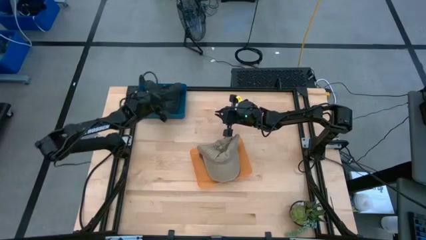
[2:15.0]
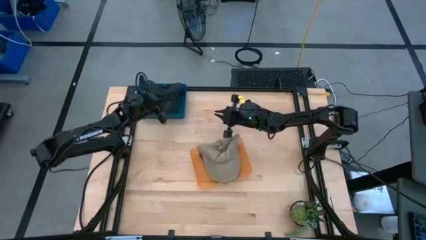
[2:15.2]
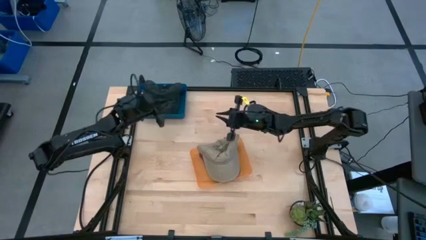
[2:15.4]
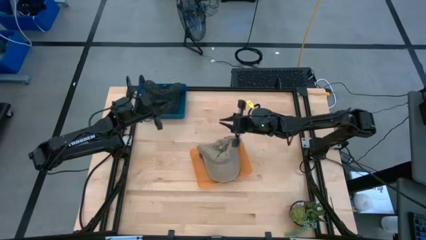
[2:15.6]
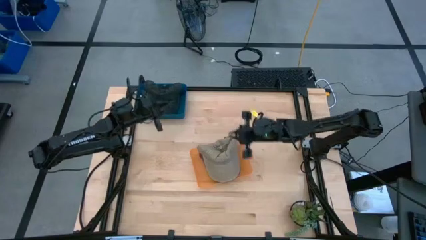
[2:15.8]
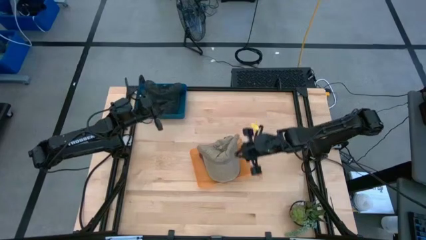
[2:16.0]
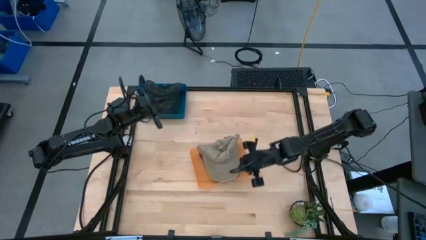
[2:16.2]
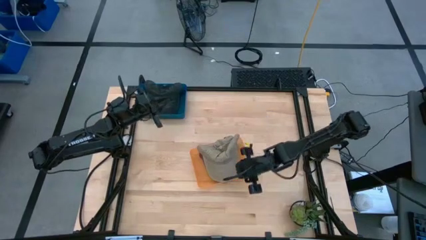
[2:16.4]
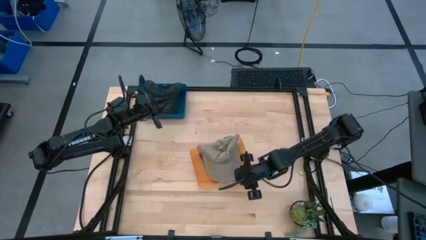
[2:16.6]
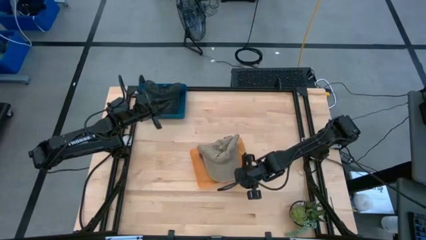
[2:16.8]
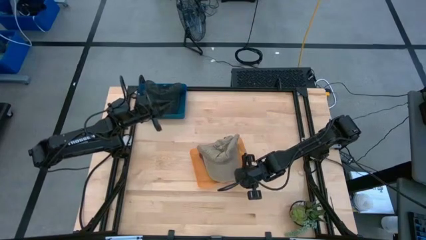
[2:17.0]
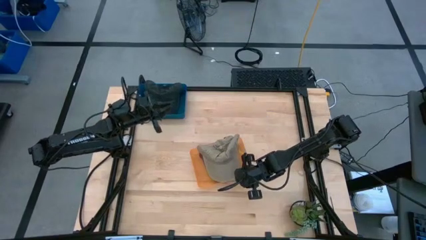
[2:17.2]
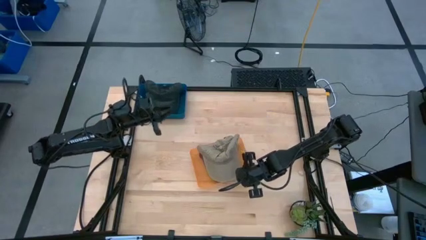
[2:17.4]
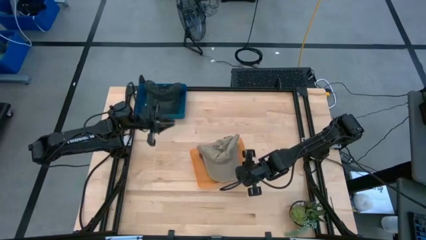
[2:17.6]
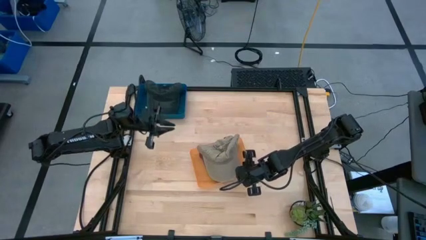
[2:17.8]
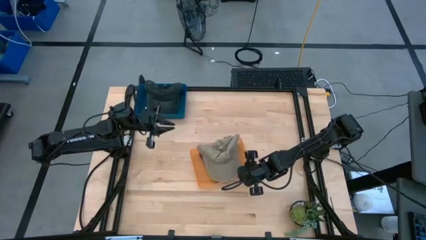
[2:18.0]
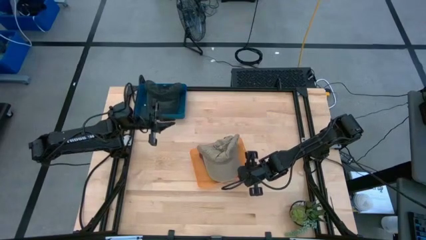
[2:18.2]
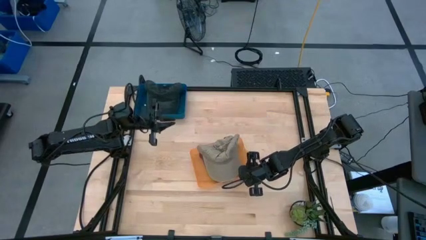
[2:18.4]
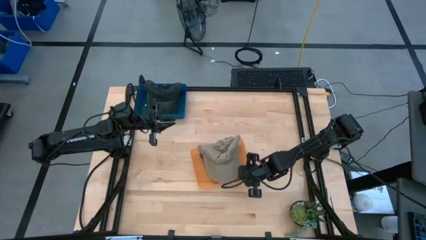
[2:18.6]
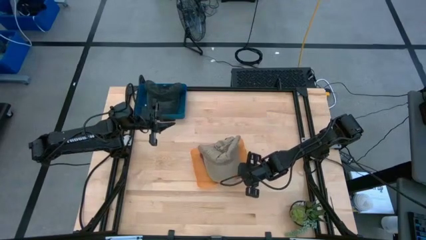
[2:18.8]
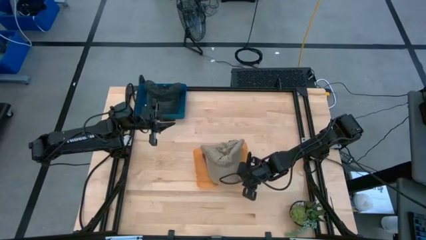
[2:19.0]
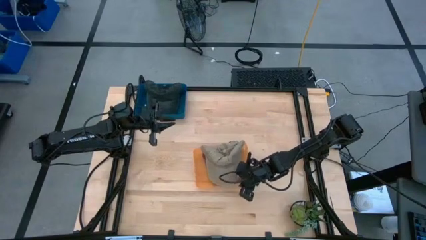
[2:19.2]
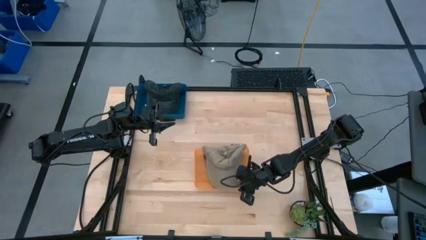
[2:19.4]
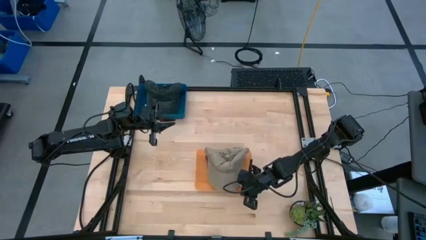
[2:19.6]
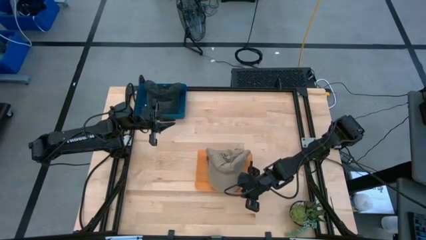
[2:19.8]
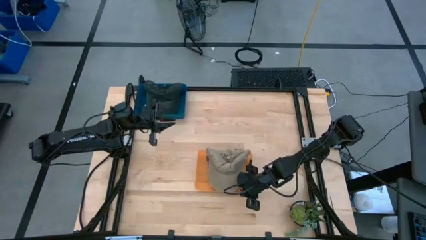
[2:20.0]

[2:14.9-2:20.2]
Task: Pick & Place hat
Adjust the orange bin

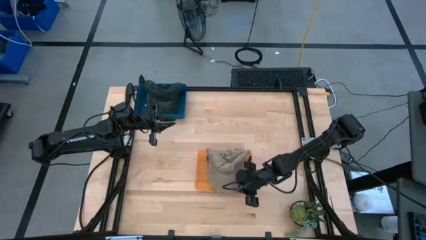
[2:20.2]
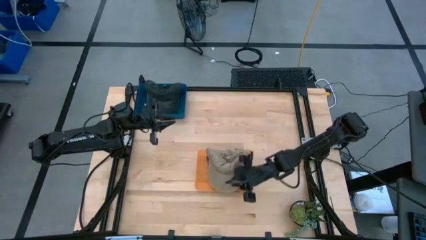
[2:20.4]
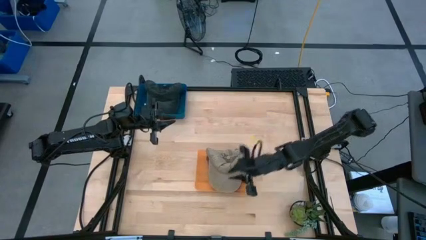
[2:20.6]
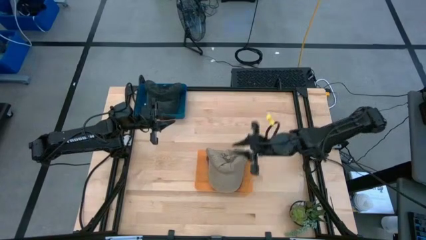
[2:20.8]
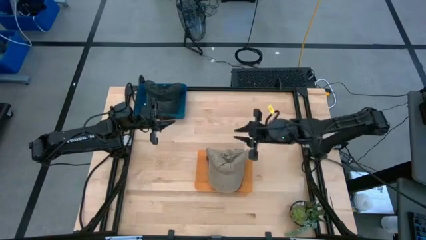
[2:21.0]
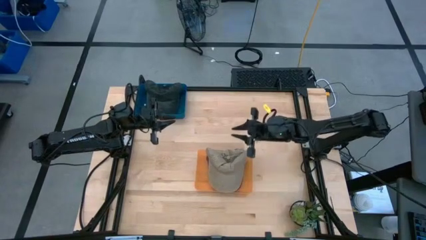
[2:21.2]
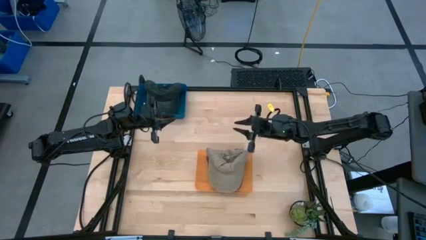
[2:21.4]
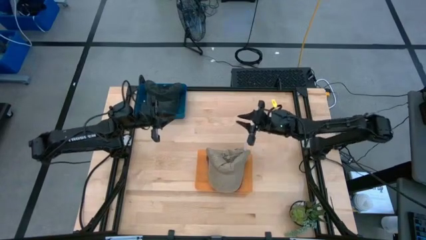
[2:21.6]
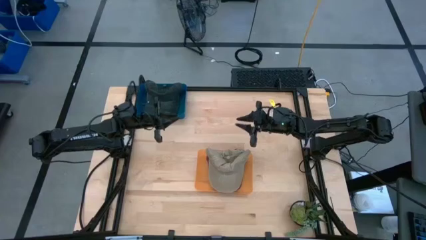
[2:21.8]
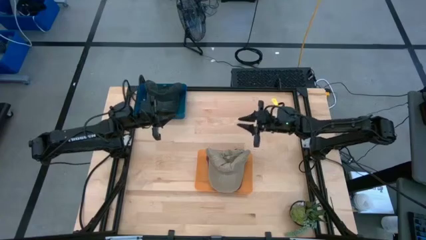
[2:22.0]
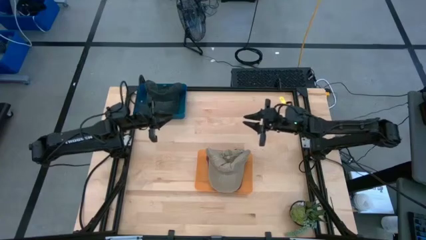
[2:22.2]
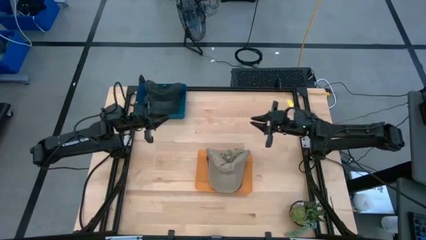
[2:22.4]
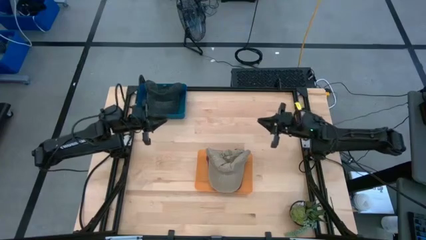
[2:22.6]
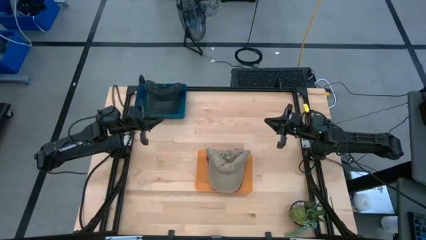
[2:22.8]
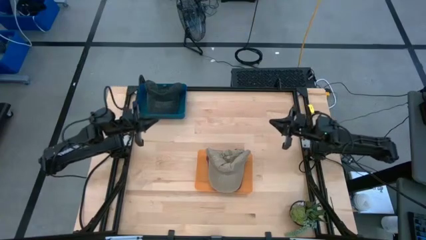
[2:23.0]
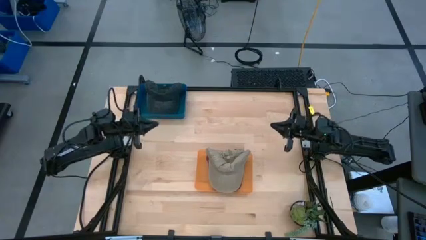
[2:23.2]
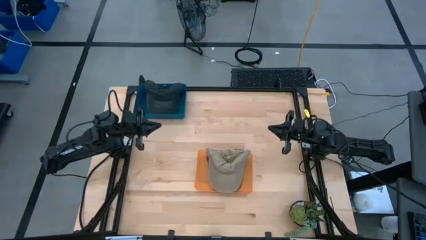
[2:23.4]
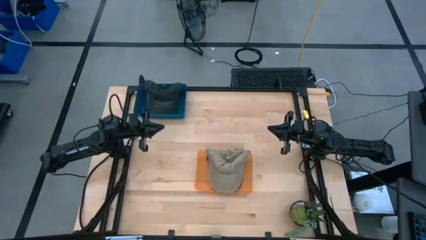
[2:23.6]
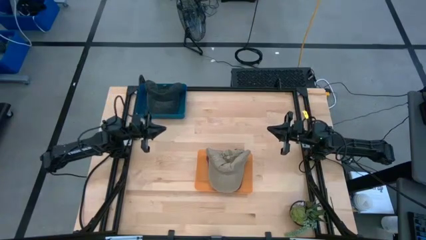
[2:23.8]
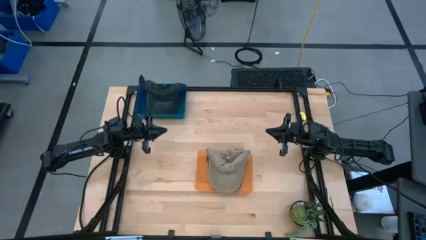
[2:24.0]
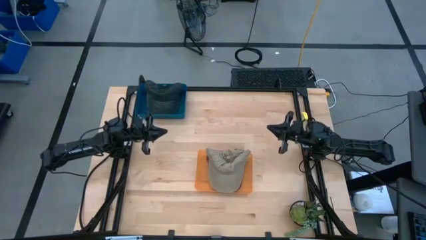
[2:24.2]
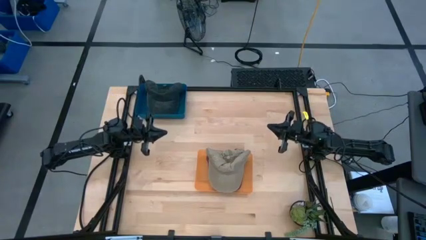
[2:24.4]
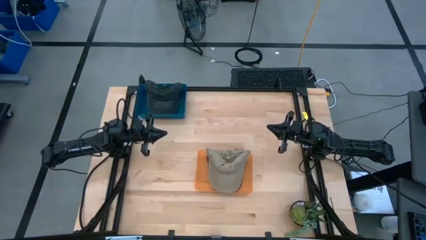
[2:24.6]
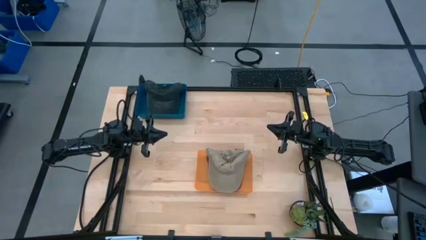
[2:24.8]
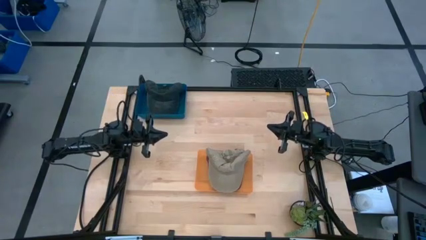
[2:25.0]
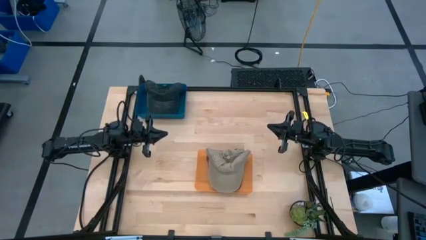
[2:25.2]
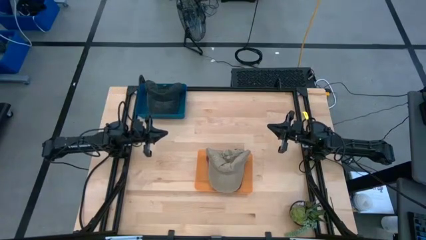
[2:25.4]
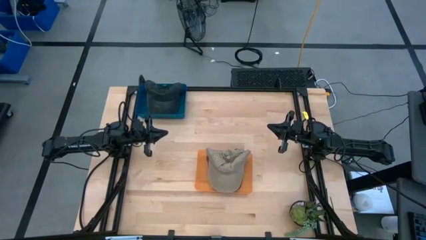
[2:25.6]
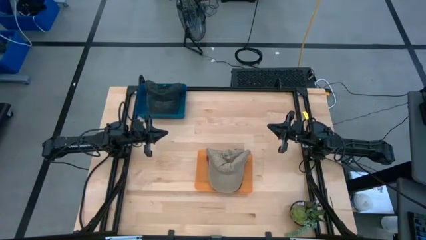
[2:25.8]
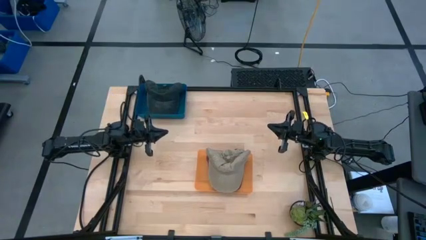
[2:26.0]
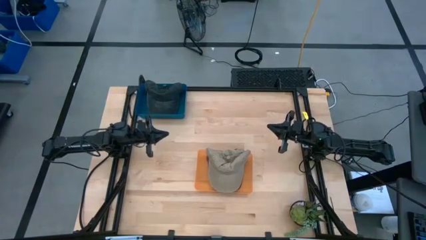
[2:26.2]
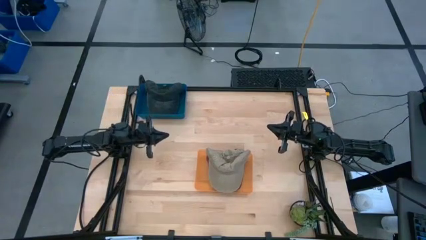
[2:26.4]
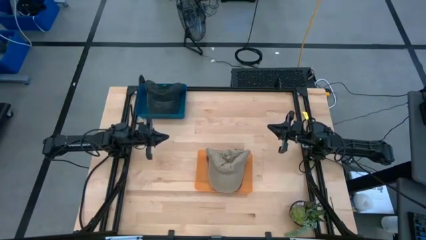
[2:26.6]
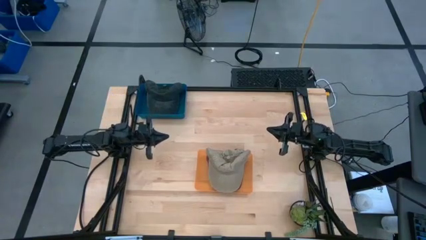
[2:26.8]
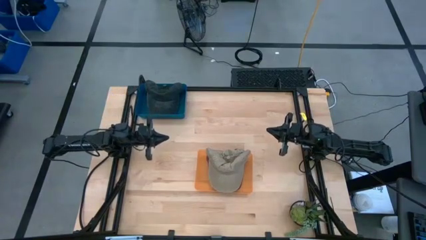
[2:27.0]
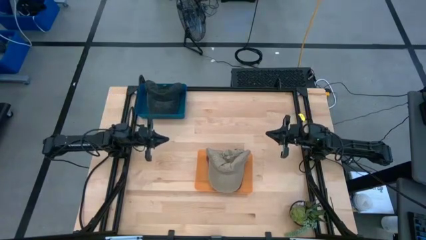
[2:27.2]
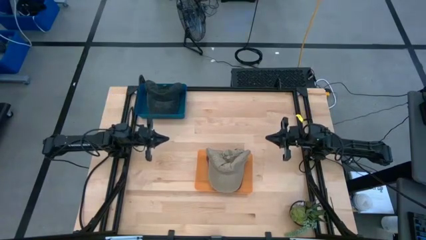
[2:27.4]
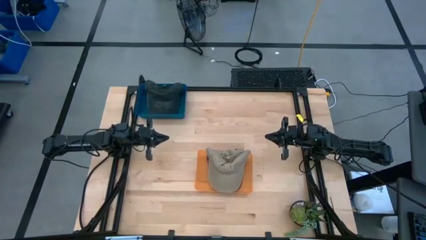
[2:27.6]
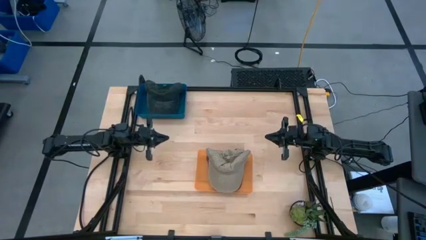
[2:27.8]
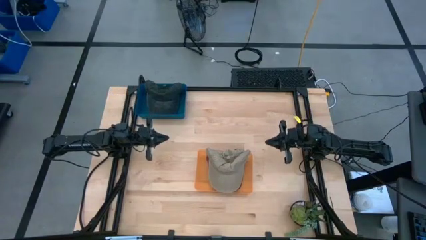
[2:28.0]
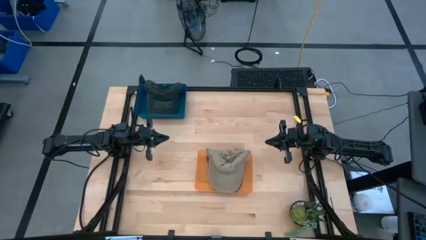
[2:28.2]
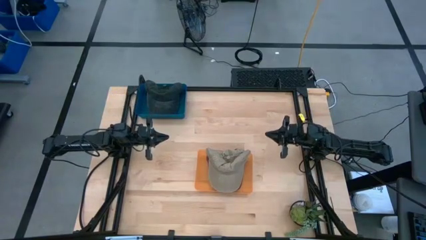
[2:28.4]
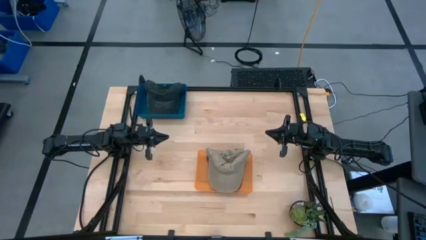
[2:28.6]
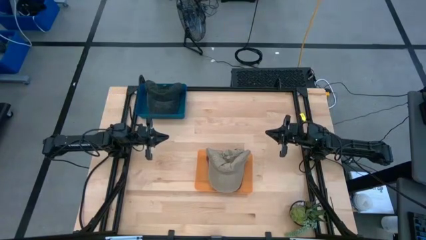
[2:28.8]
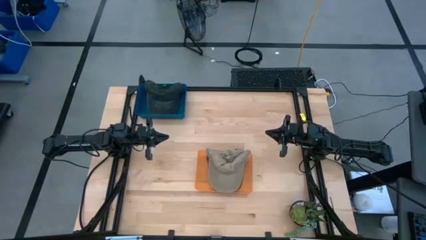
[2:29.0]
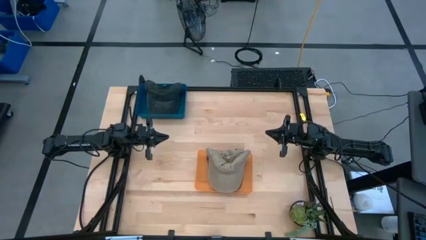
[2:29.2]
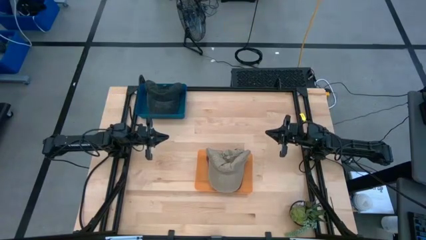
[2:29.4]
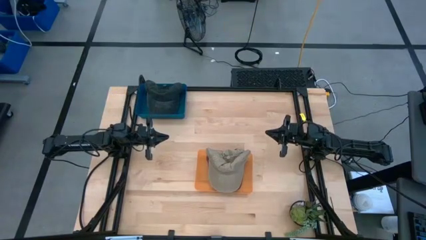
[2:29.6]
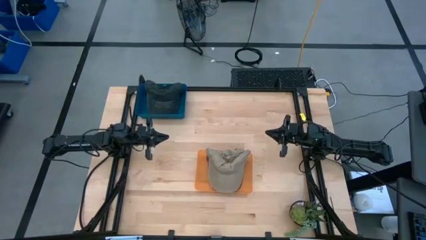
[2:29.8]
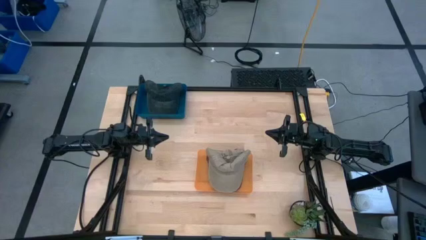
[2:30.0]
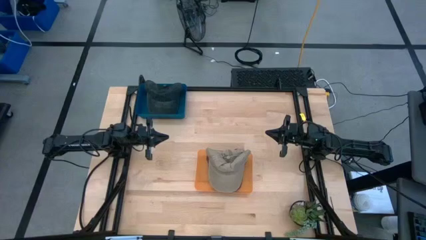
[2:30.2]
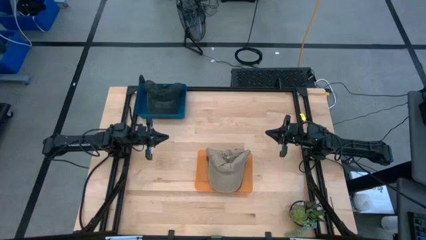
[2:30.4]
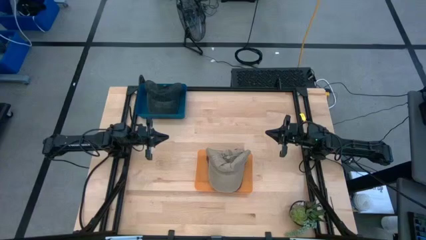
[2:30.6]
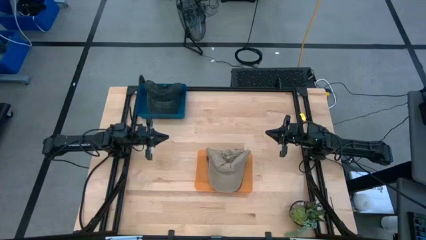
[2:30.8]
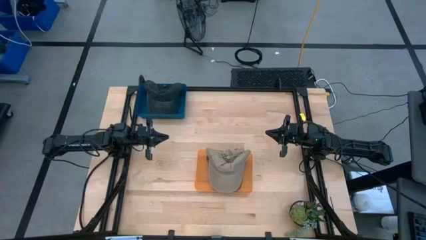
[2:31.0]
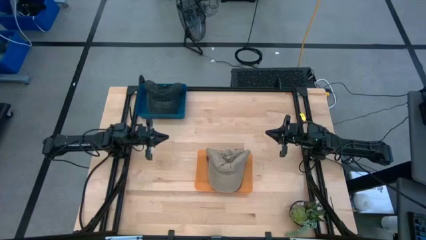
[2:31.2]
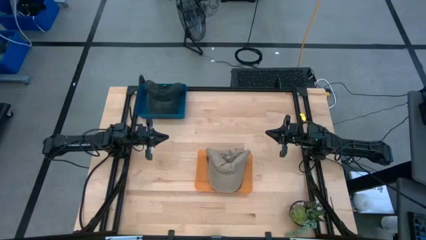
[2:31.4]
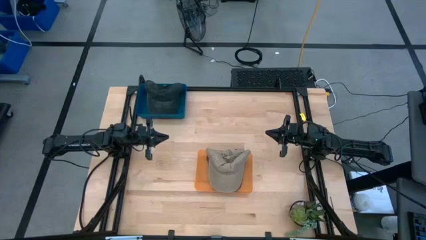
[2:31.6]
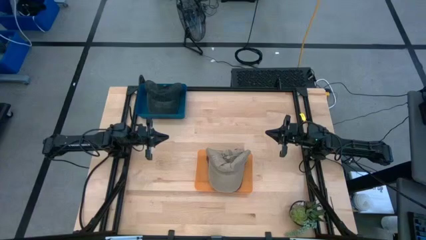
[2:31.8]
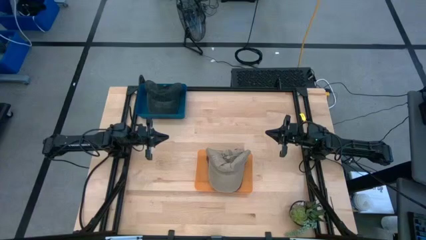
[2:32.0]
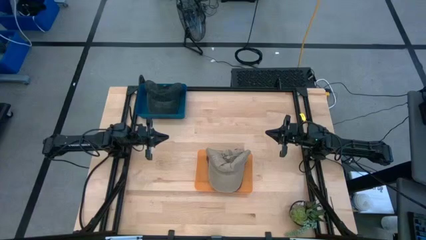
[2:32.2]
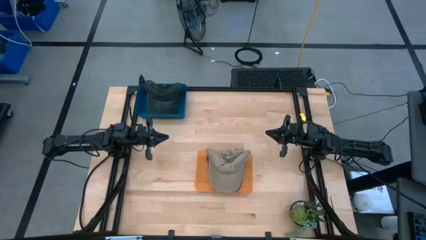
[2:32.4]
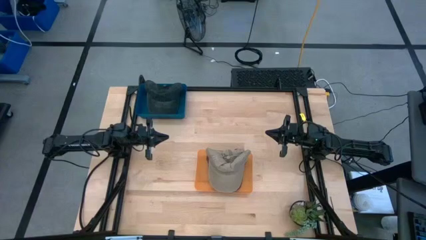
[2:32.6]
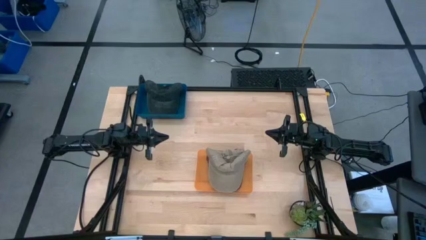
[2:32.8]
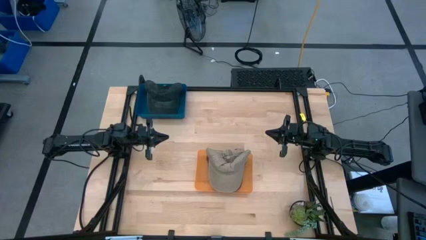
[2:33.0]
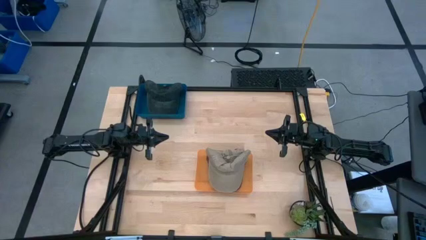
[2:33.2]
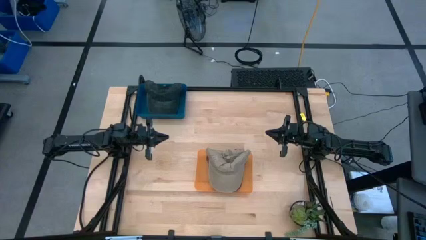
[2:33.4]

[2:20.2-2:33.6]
Return to Home Position
